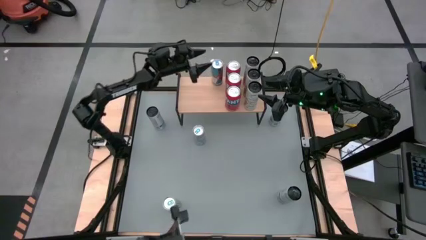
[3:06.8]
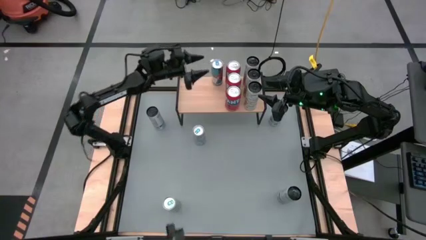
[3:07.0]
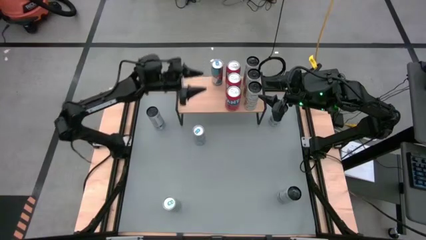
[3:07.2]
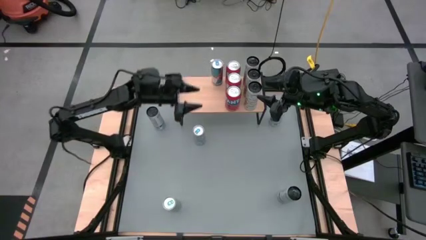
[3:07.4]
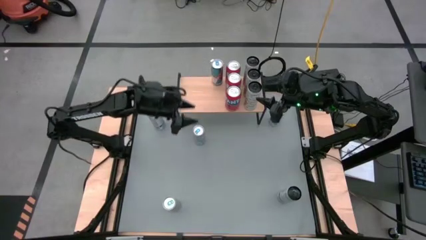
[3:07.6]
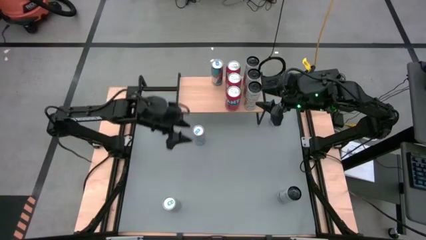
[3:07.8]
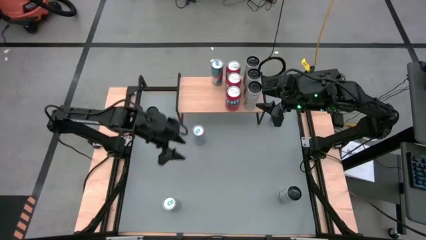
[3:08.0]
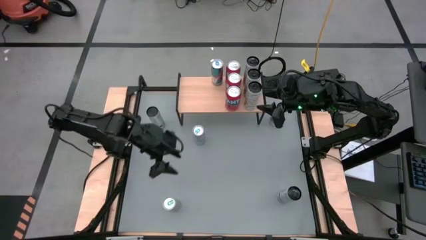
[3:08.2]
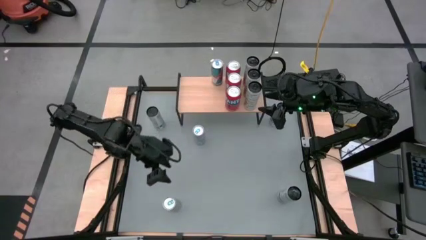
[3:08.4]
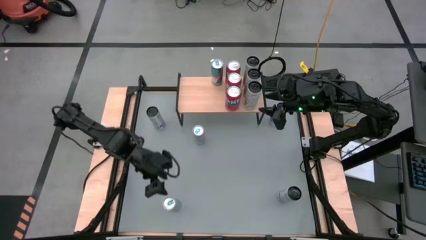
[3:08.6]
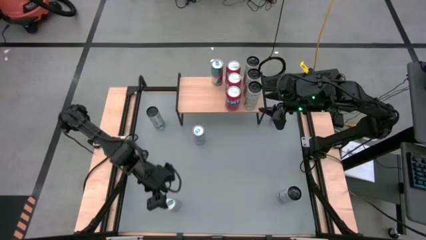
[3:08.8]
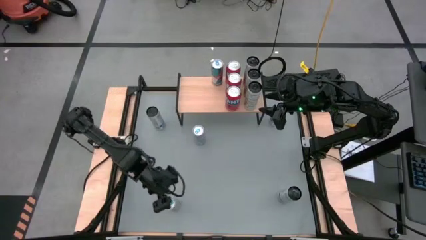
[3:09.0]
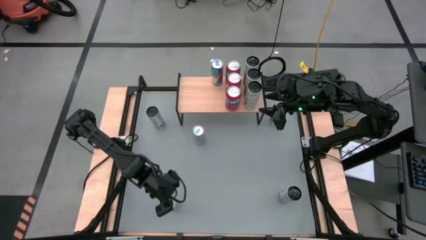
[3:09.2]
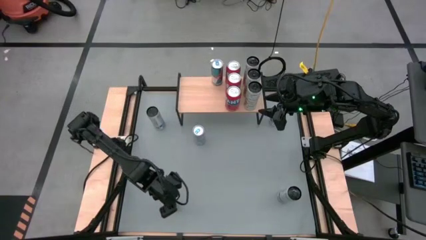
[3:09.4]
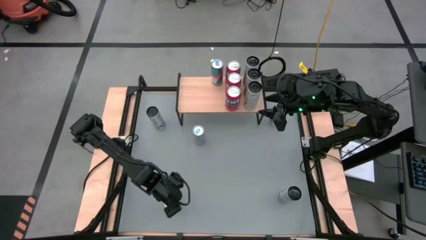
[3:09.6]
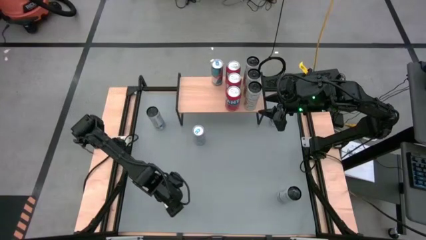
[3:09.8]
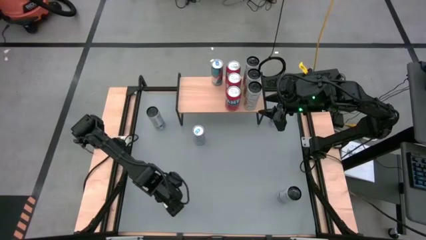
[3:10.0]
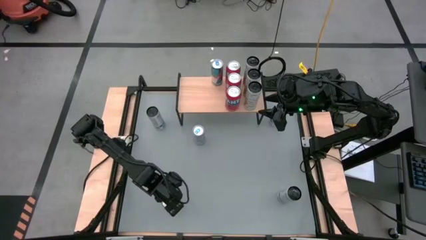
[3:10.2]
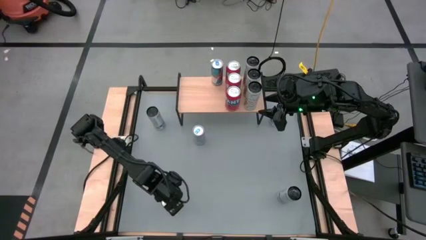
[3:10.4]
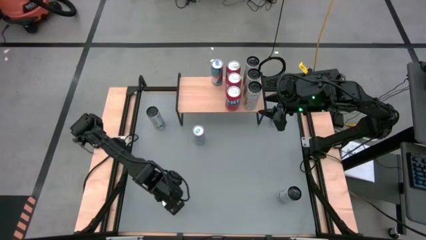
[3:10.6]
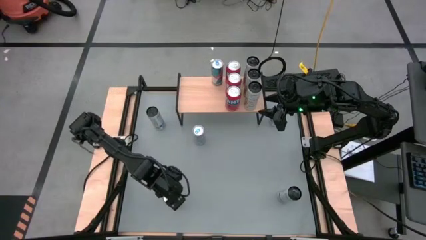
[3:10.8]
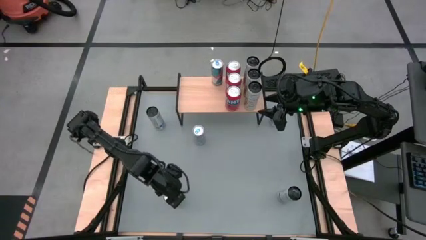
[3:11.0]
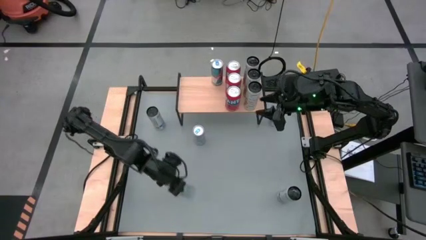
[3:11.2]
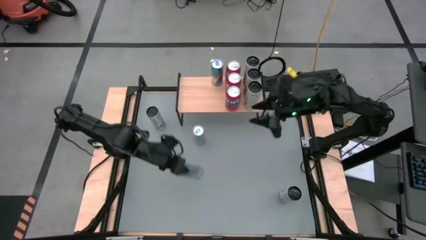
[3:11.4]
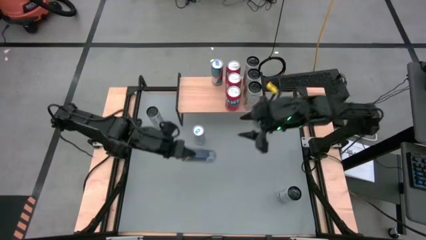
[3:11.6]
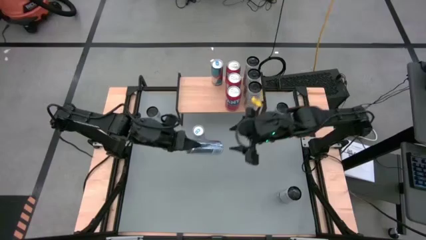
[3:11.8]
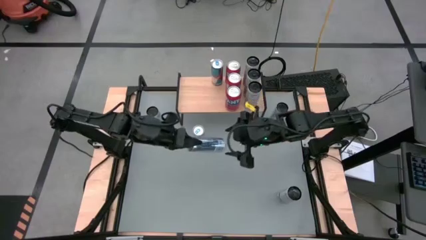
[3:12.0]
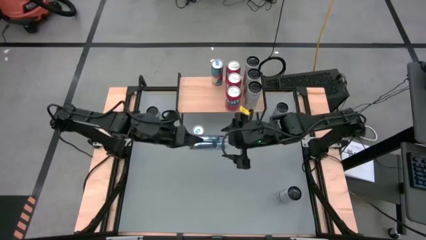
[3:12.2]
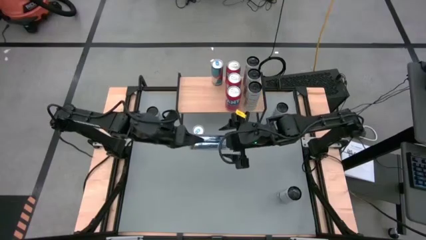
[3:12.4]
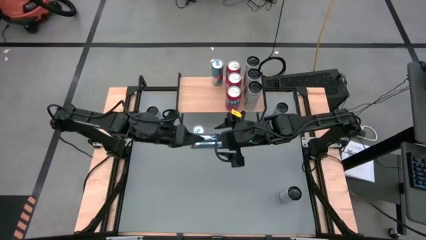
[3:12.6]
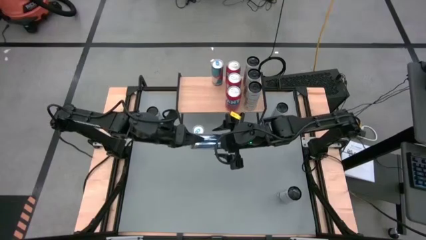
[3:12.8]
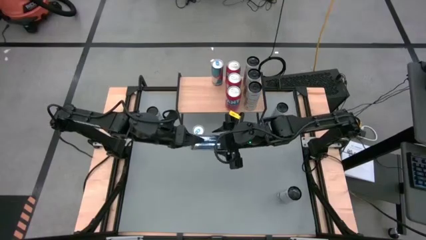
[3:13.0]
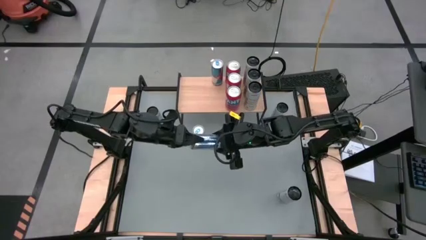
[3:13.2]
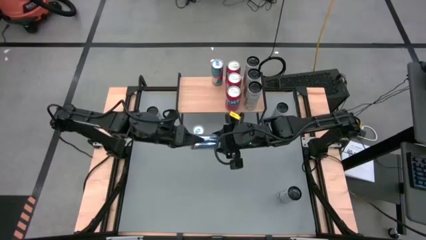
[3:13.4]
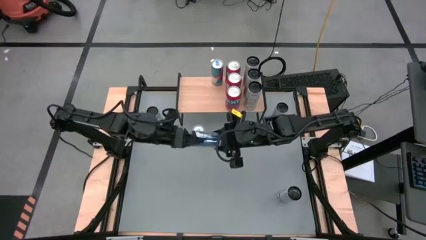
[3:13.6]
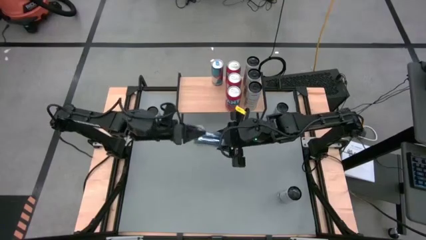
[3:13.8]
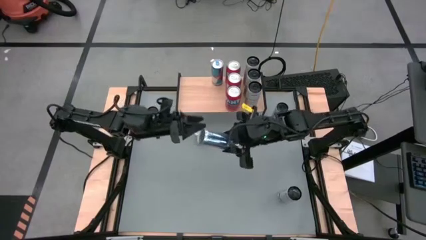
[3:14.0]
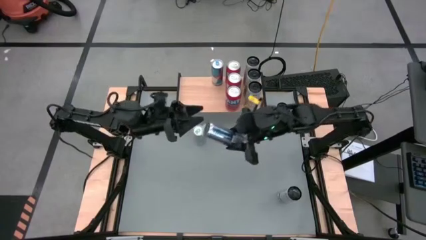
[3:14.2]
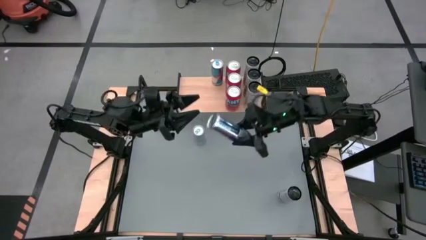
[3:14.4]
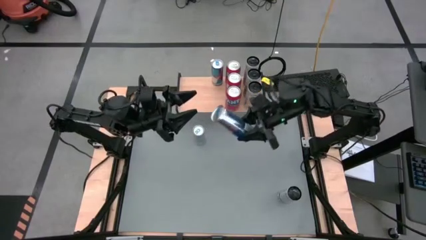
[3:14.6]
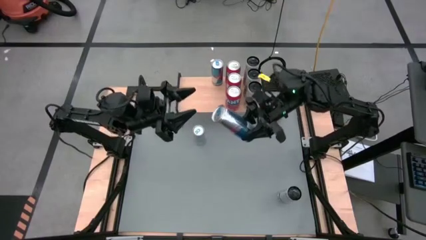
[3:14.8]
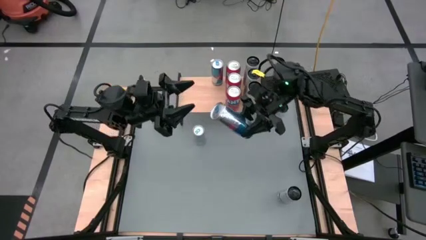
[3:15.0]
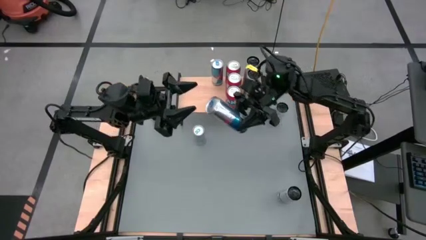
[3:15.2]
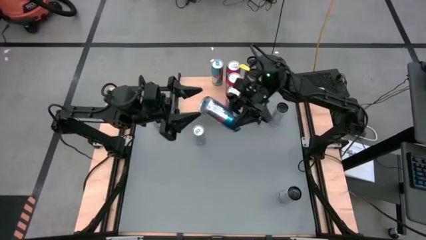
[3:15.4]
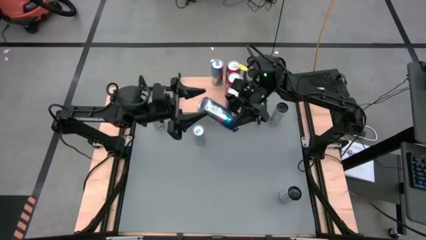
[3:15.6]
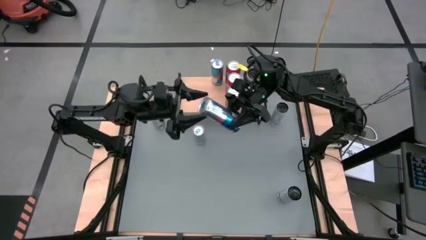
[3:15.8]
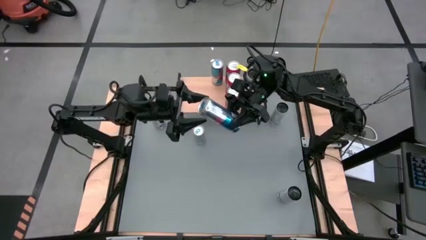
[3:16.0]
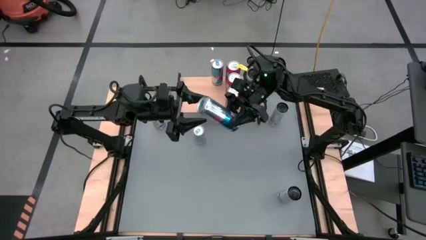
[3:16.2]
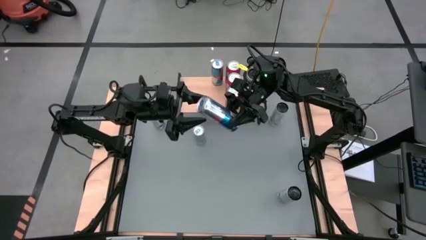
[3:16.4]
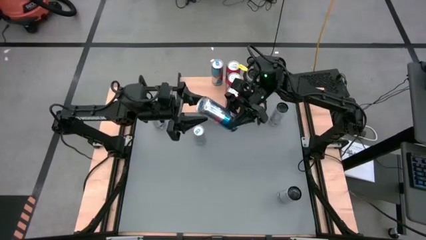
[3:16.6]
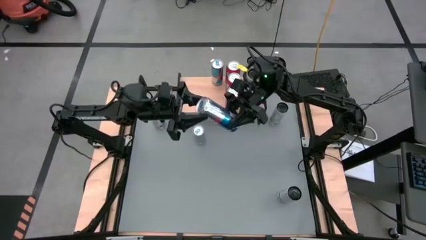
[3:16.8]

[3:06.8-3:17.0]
Task: Place canned beverage on shelf
Put the bottom blue can on the shelf aligned with the other blue can

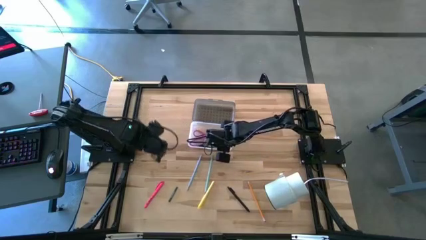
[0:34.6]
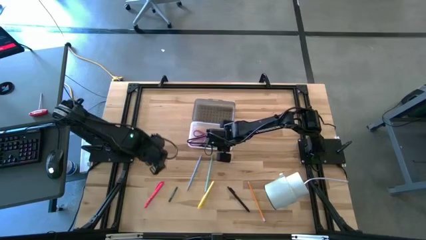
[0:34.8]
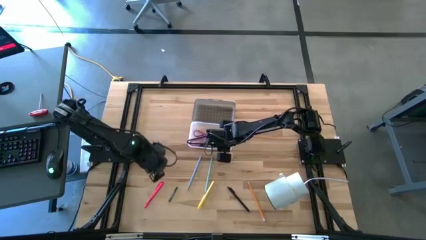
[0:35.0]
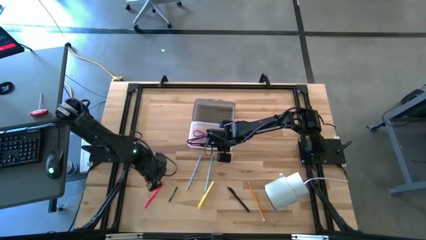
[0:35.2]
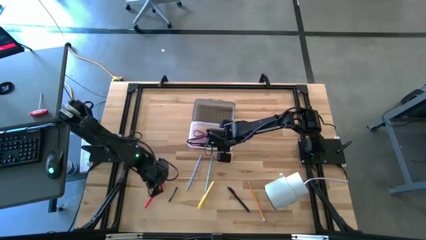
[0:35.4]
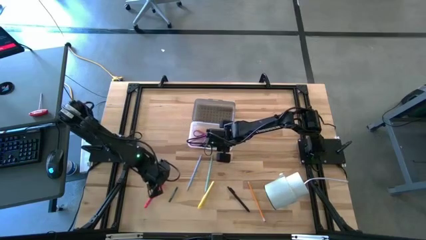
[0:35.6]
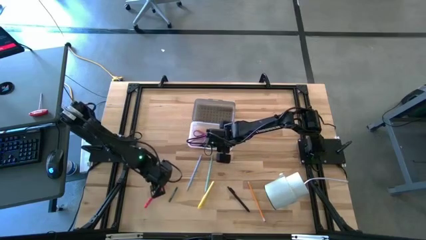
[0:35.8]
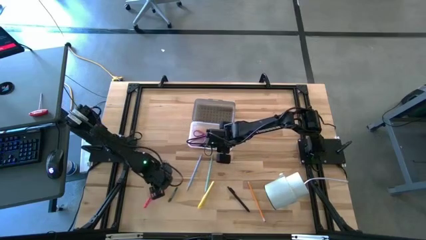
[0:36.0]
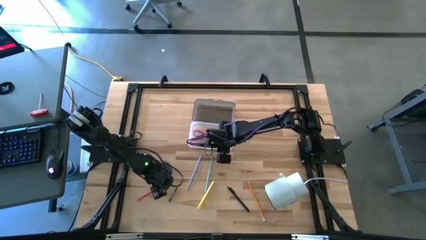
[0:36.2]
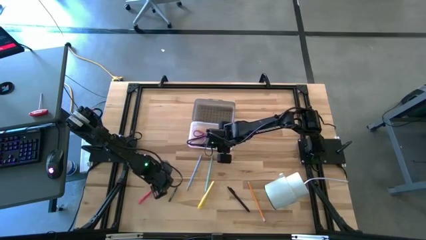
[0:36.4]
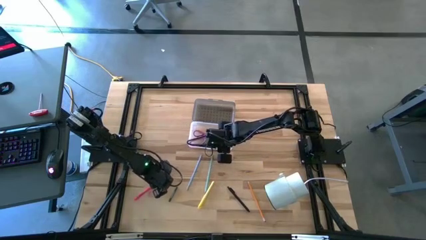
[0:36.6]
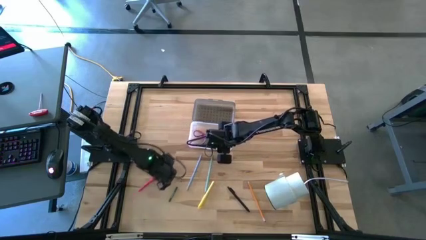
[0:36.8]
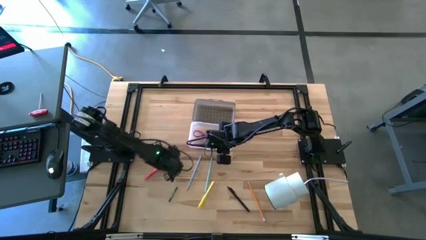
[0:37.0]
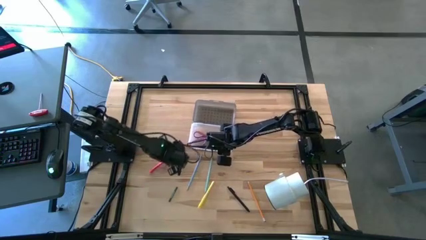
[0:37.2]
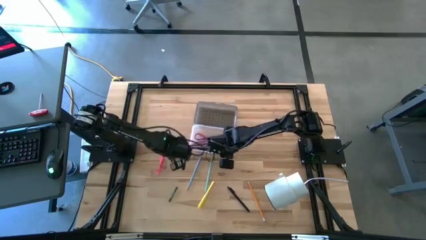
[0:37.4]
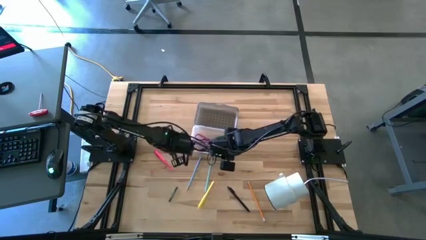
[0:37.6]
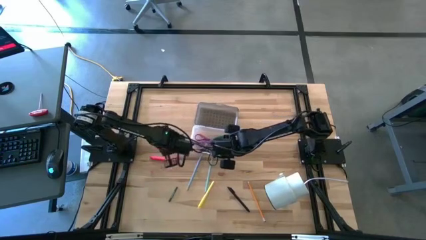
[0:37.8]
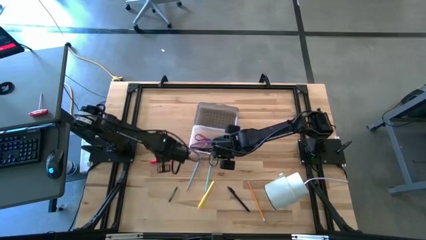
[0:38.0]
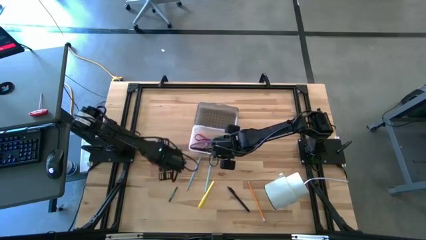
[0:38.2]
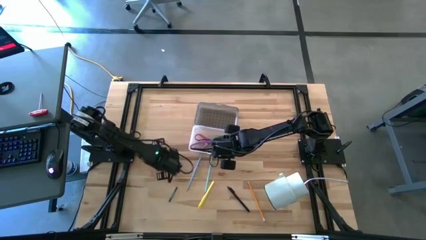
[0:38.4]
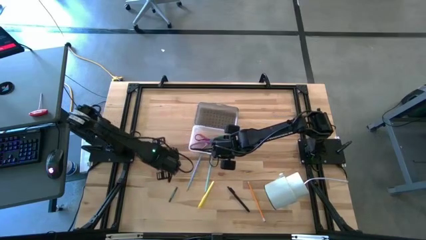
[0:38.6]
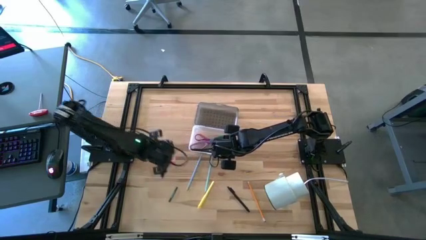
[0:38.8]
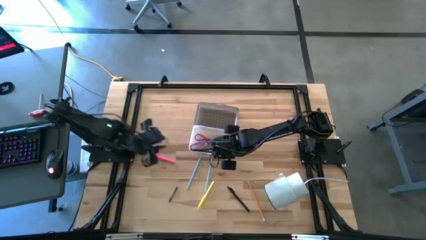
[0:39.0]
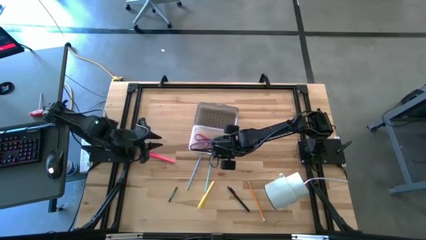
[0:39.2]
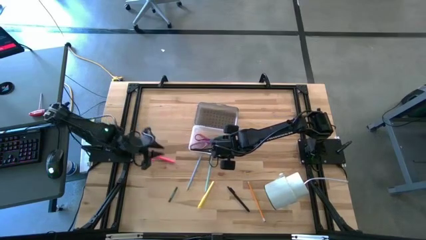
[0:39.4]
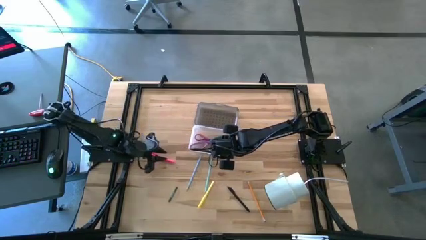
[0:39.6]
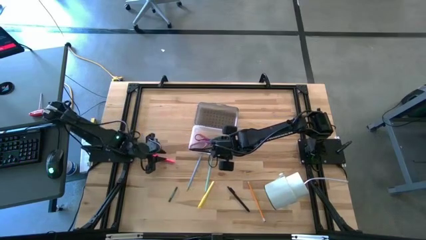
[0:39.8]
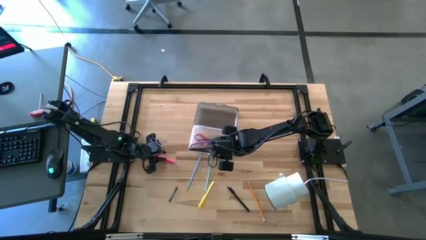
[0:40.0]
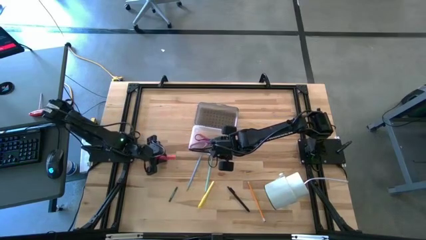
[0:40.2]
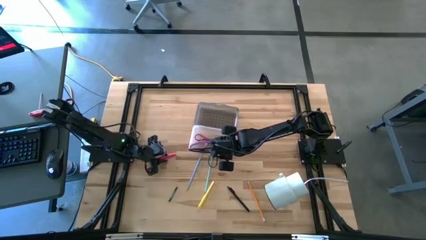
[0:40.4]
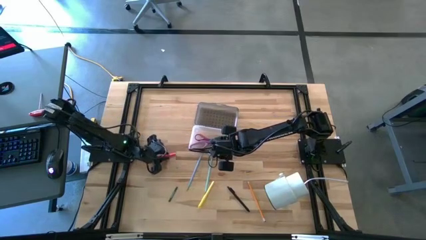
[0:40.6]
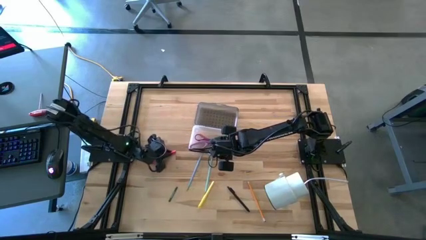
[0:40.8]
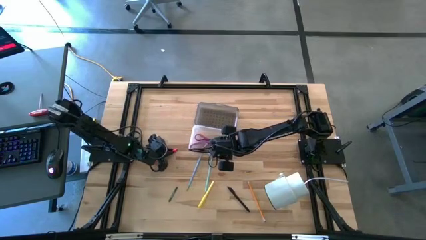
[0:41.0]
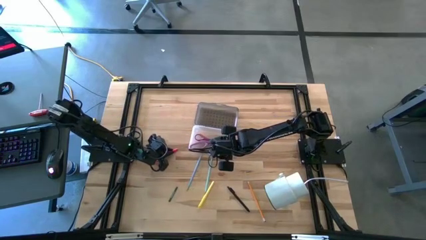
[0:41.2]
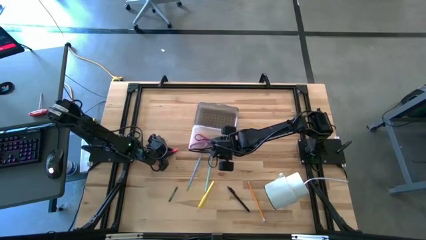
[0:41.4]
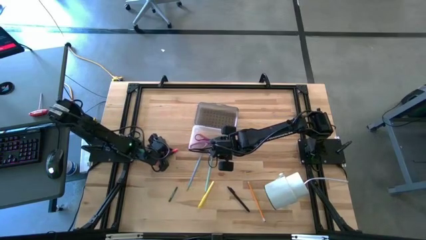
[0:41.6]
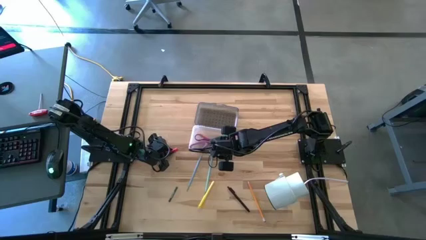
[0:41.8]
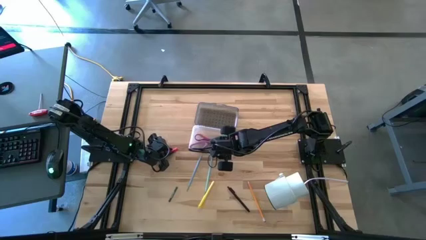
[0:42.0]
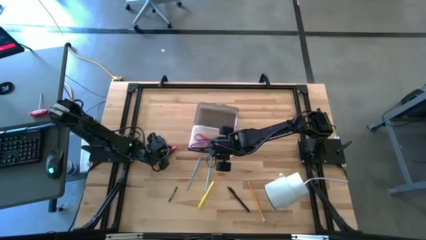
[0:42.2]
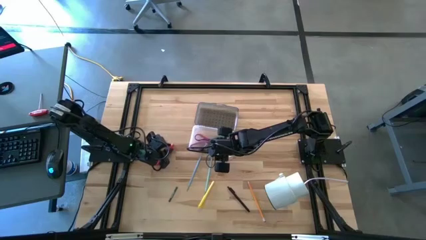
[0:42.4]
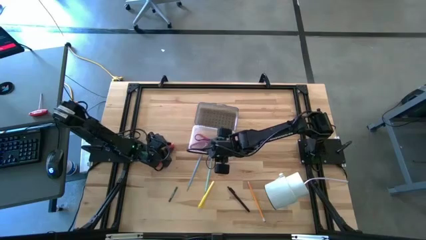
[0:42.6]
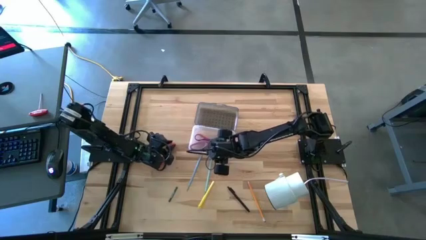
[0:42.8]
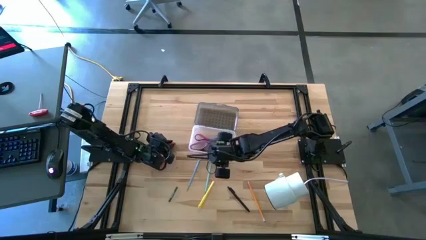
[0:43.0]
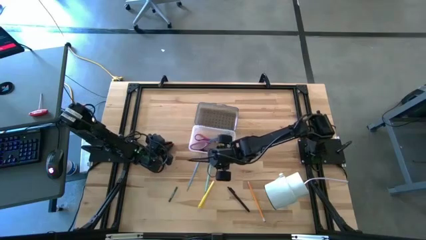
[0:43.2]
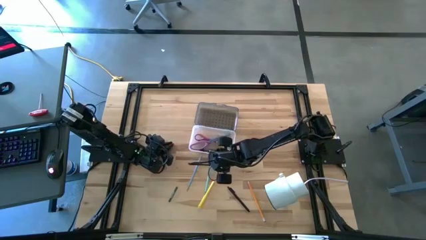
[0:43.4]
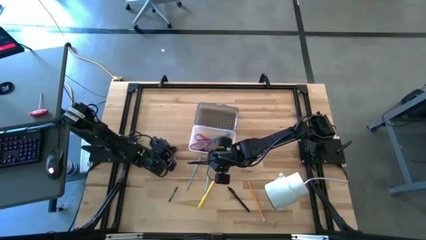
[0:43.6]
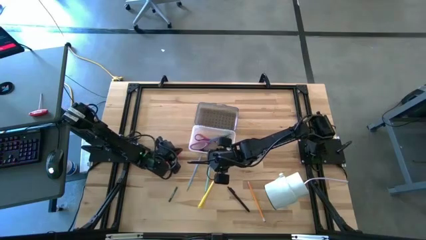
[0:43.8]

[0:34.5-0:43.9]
Task: Pick & place school supplies into a supply box
Put the pink pen into the black supply box
